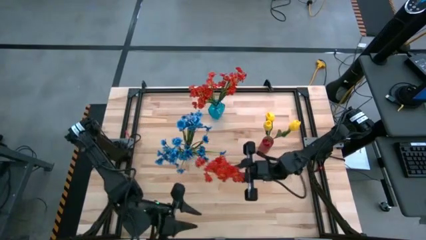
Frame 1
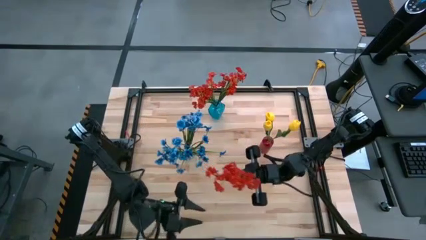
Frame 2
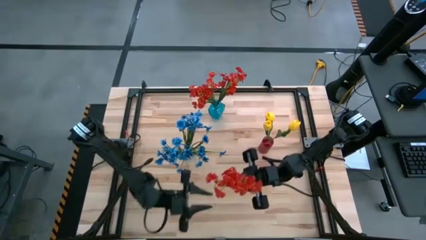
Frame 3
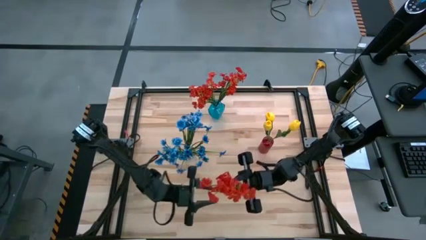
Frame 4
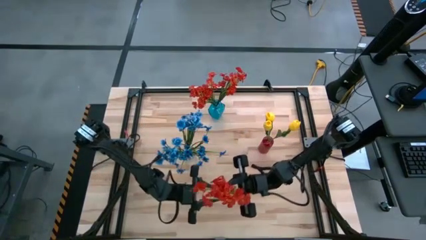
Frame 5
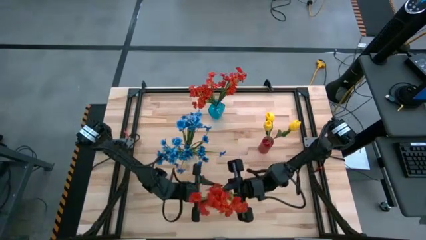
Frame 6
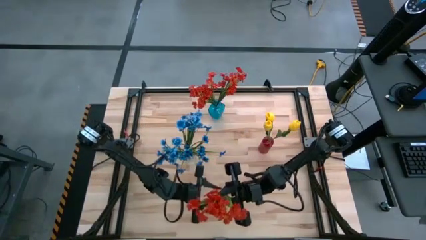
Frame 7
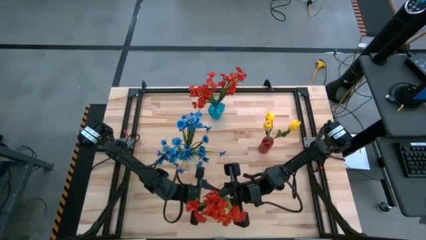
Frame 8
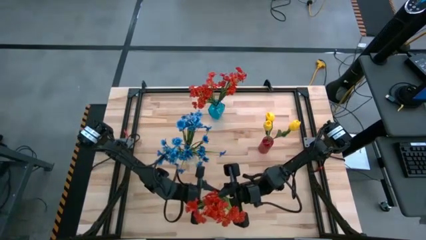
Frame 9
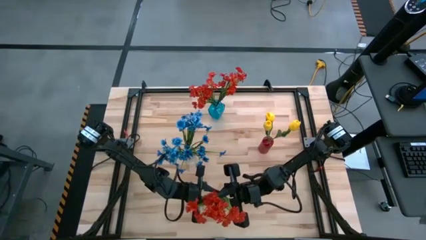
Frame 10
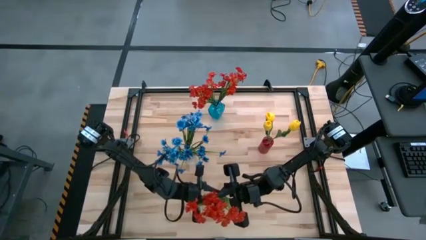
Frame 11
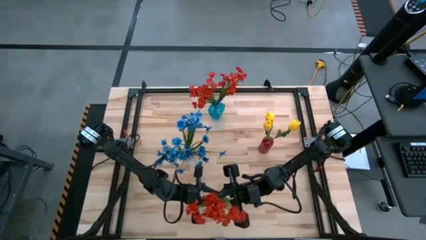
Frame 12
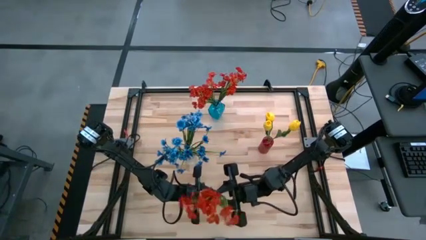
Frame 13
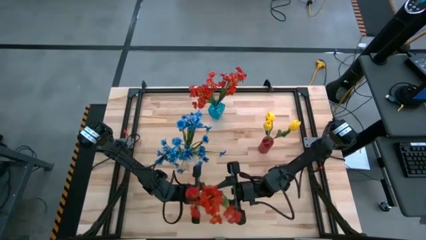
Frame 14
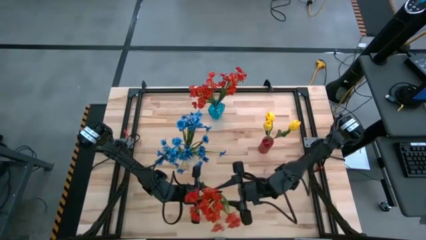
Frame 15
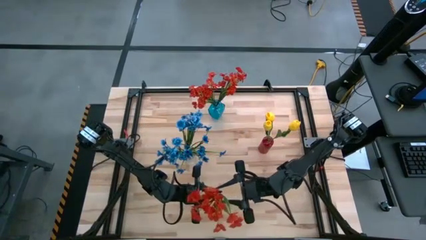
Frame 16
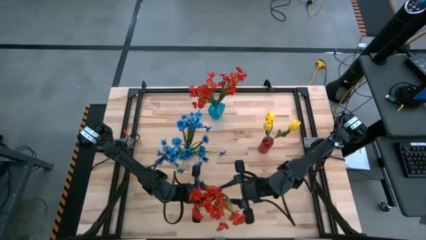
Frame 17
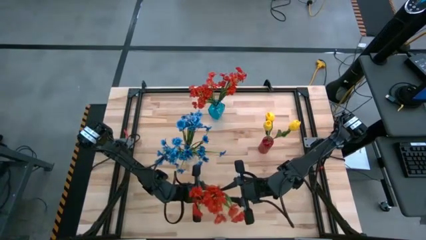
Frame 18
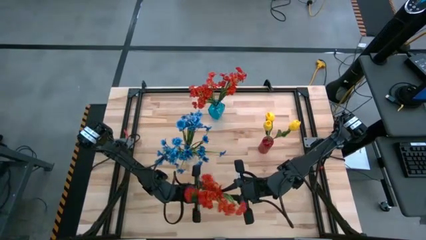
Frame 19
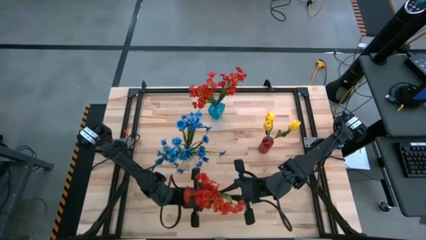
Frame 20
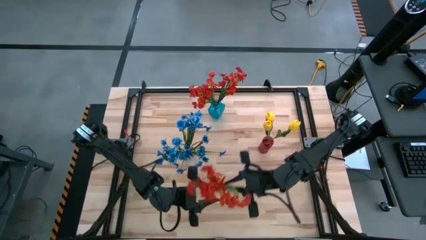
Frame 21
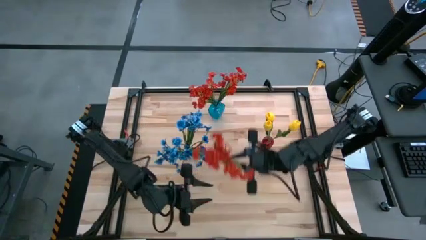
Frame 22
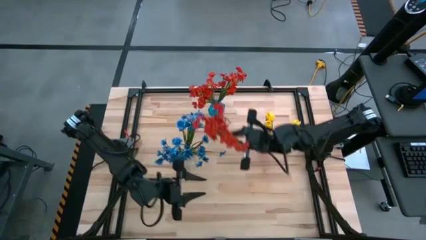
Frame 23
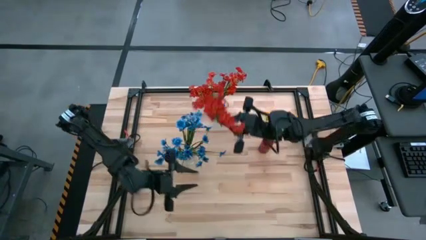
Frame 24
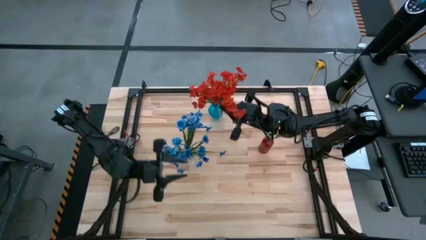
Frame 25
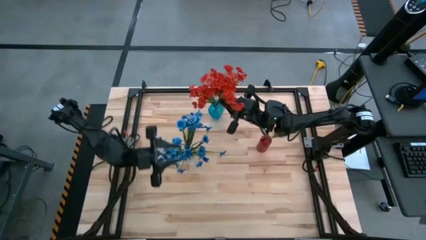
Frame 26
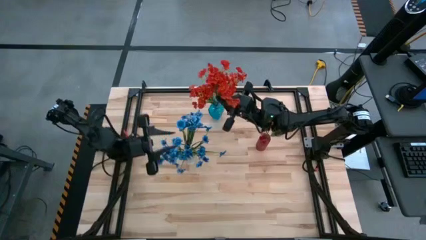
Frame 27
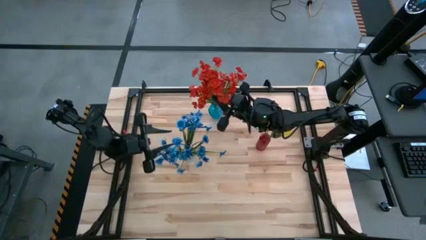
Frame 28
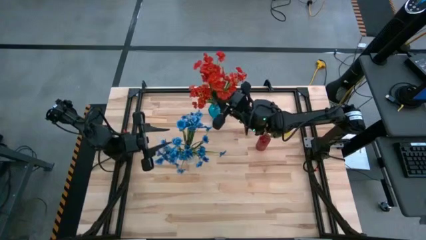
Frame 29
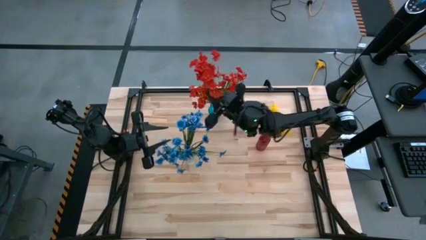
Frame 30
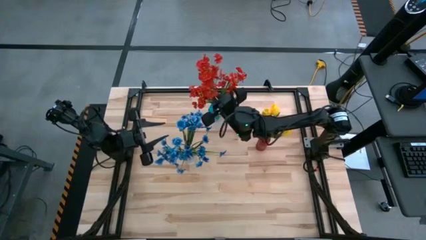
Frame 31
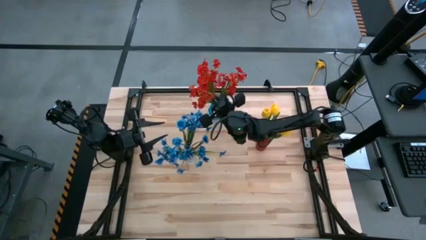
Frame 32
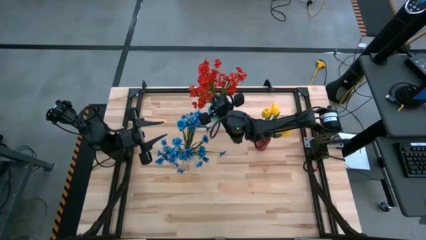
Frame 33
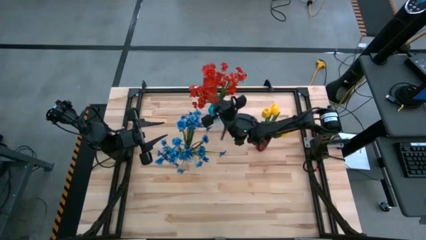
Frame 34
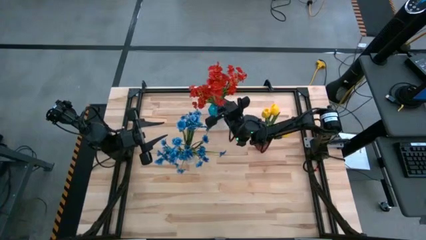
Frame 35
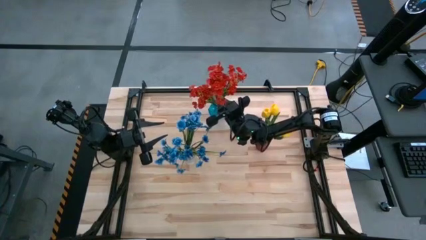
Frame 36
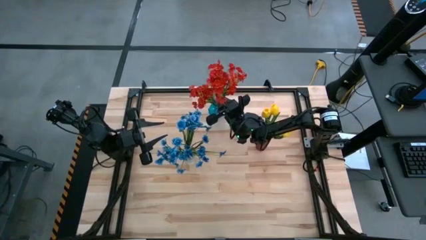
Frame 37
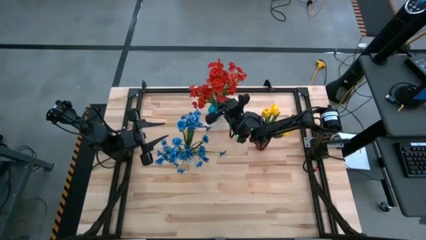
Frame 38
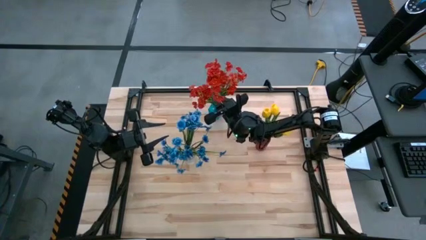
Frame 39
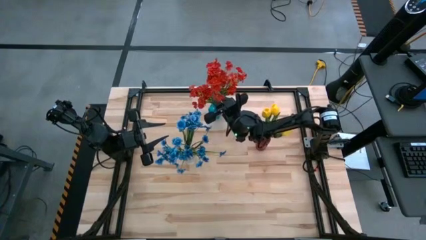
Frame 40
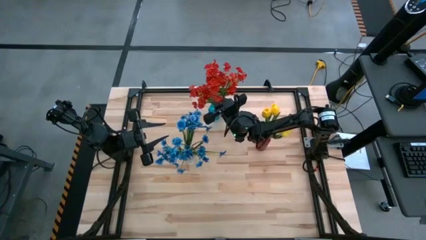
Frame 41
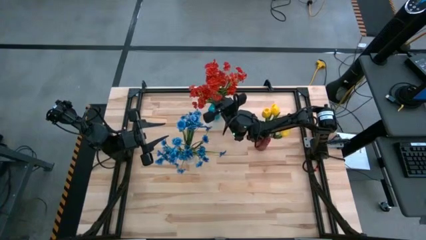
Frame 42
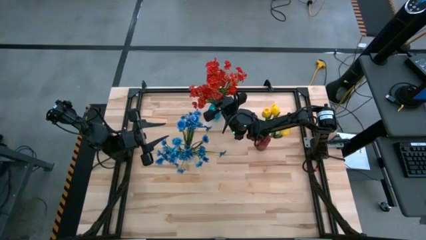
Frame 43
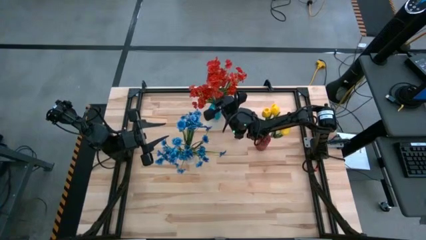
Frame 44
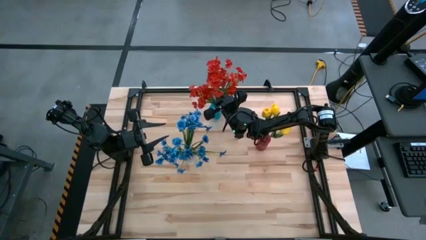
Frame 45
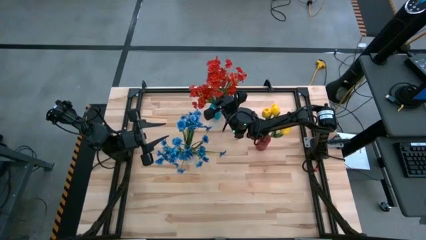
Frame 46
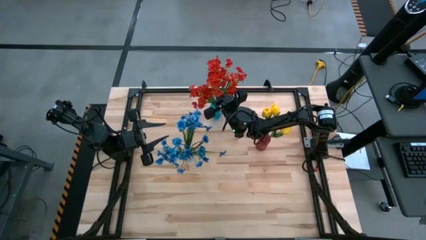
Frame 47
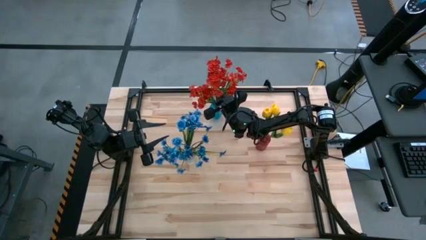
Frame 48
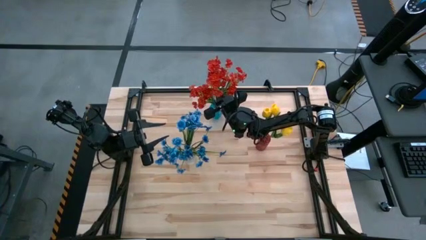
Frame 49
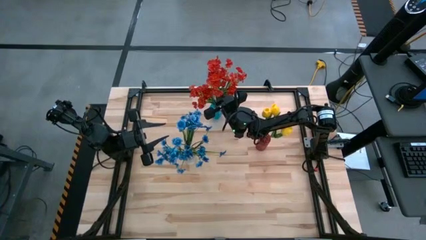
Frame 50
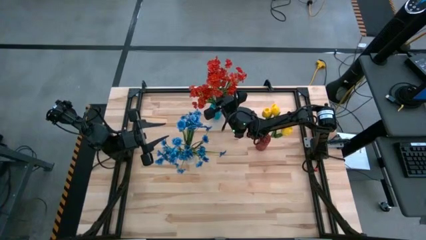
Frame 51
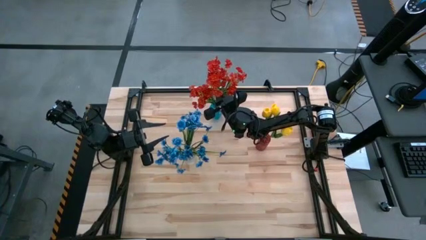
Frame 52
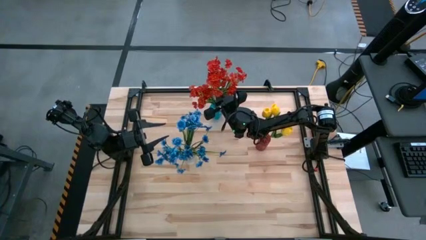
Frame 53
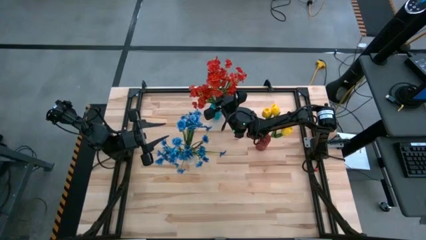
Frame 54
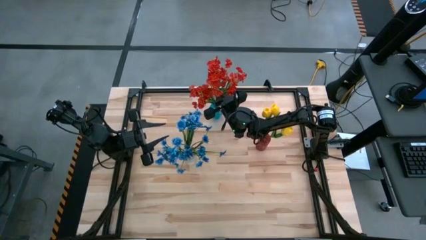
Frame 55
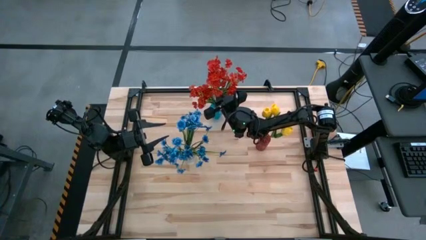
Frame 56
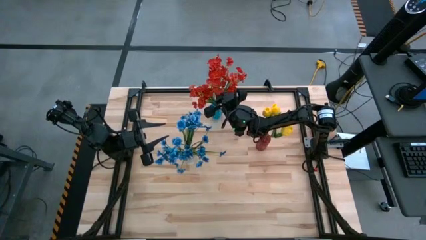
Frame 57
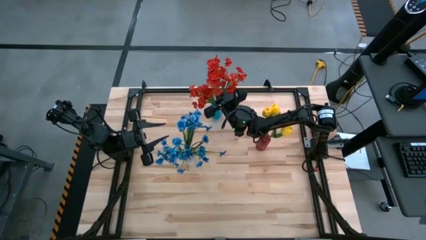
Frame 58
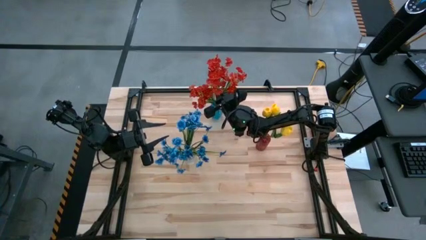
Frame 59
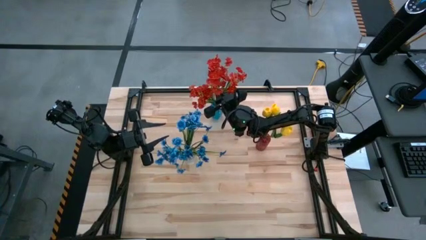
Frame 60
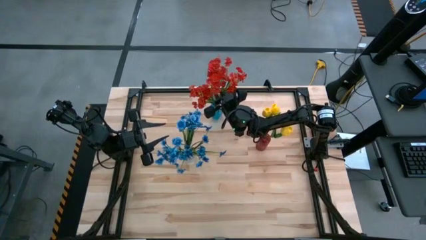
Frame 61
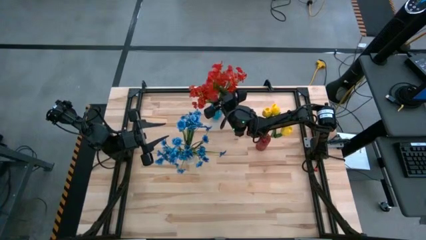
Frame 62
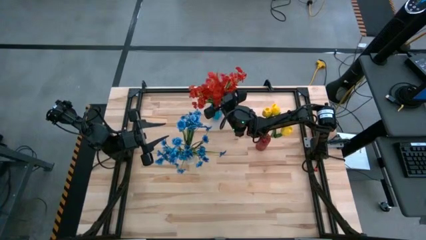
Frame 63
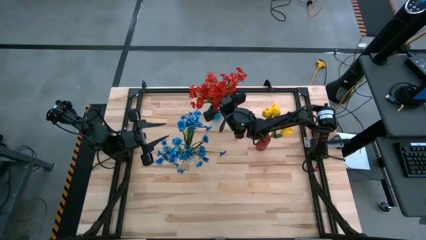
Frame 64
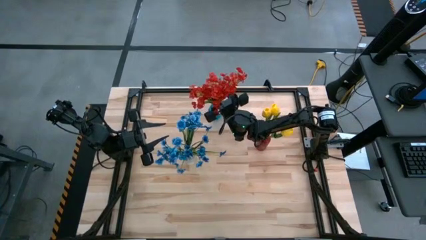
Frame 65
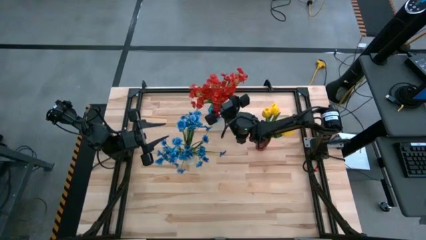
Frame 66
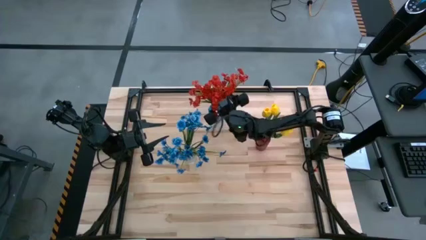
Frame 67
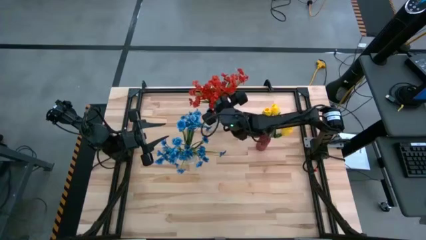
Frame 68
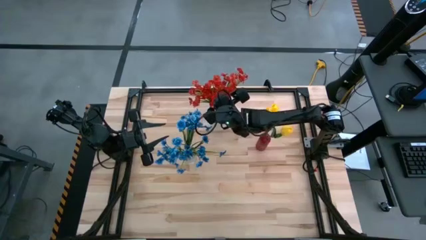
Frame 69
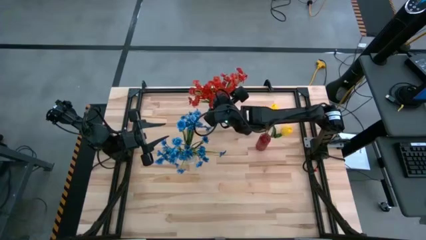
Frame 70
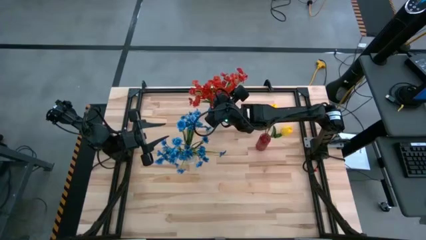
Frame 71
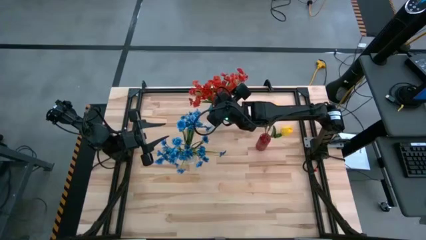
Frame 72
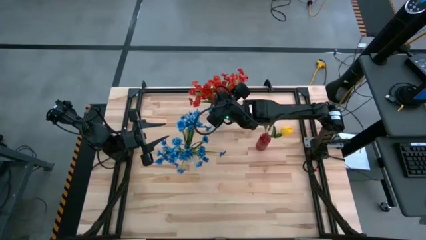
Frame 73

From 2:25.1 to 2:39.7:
Task: Sort flowers into vase by color
Put the red flowers into the blue vase
